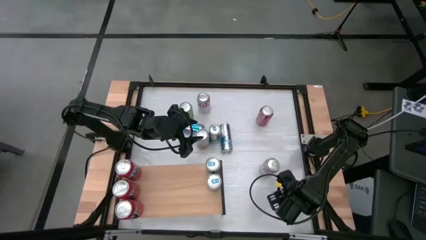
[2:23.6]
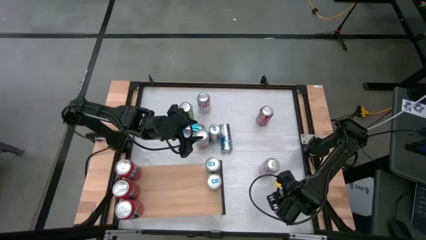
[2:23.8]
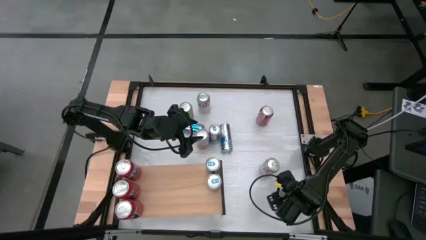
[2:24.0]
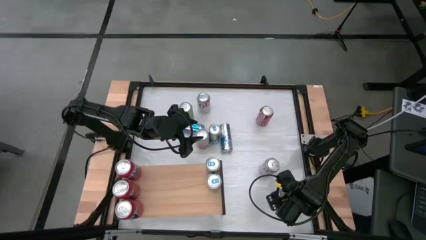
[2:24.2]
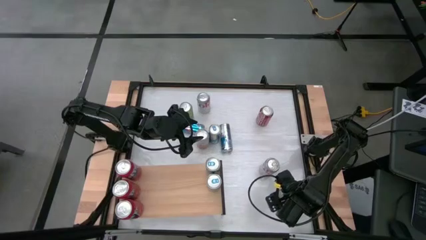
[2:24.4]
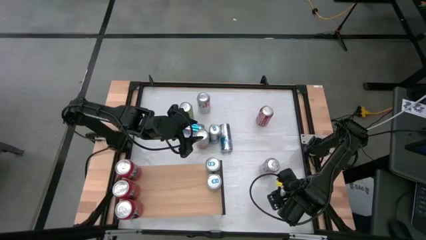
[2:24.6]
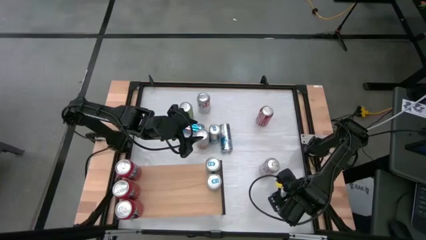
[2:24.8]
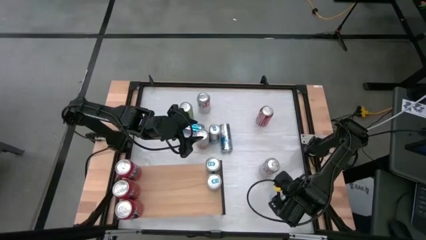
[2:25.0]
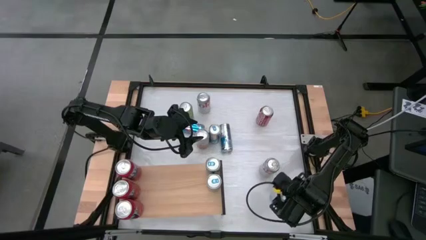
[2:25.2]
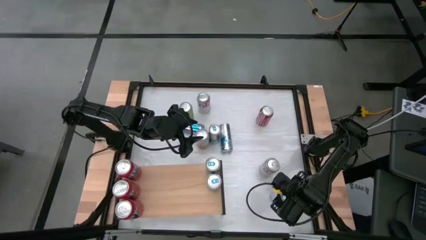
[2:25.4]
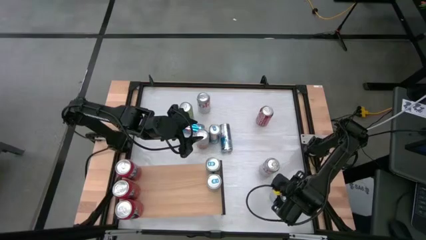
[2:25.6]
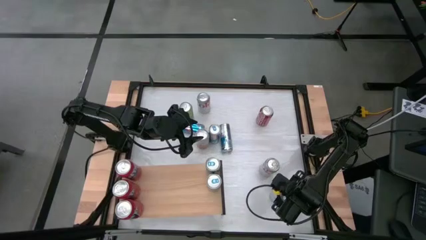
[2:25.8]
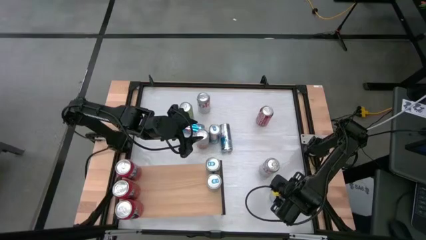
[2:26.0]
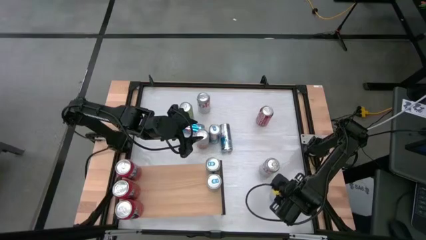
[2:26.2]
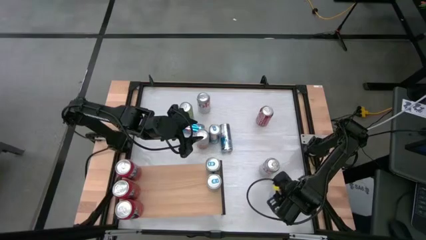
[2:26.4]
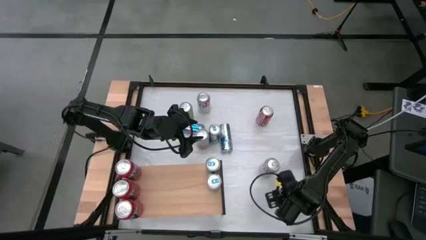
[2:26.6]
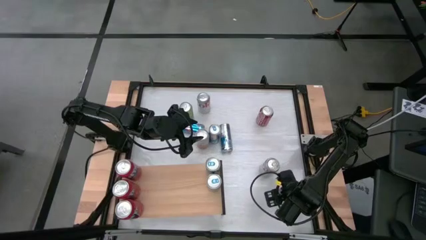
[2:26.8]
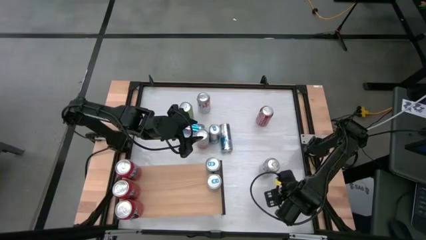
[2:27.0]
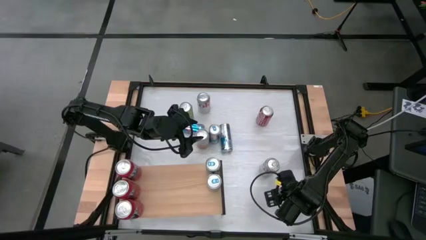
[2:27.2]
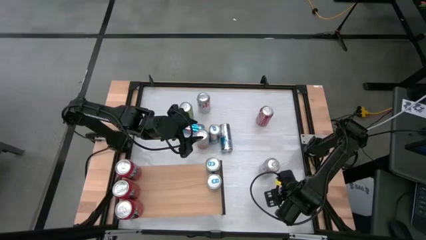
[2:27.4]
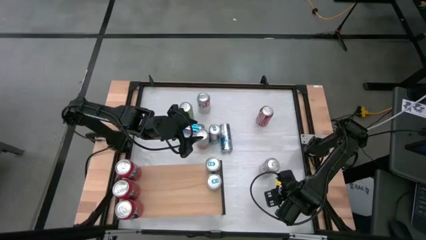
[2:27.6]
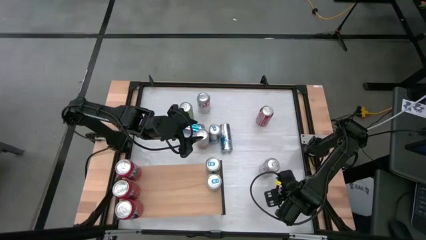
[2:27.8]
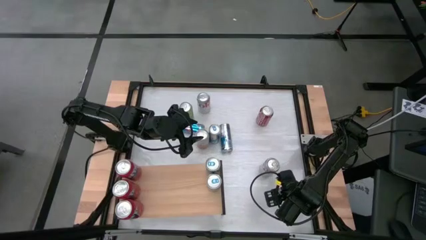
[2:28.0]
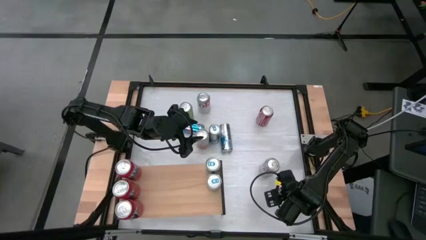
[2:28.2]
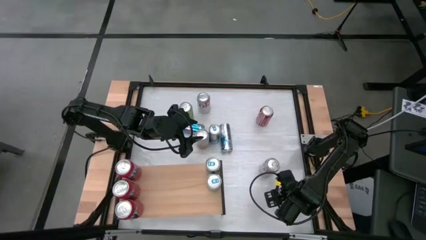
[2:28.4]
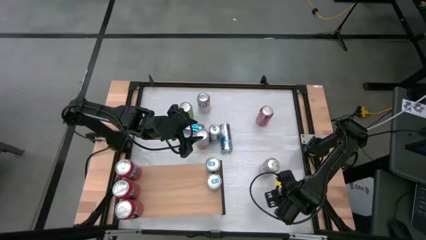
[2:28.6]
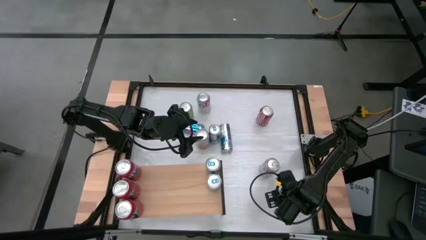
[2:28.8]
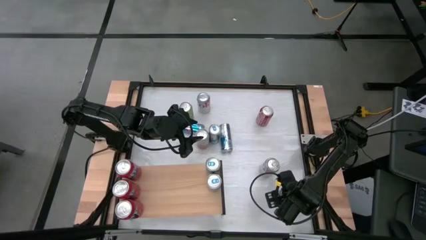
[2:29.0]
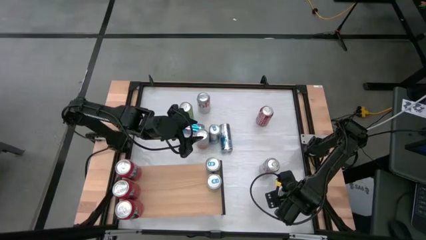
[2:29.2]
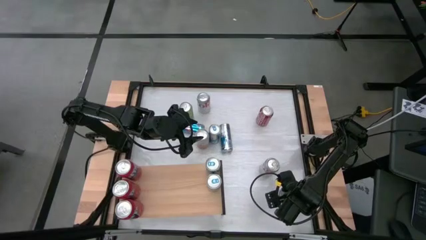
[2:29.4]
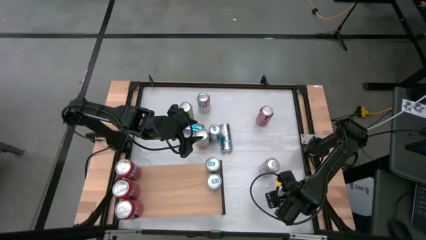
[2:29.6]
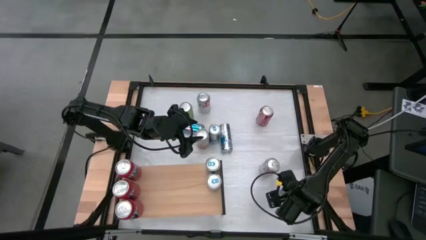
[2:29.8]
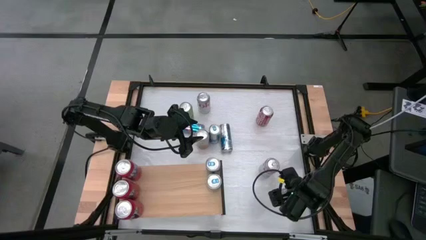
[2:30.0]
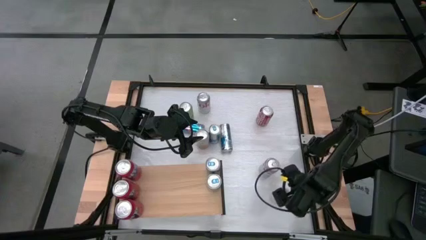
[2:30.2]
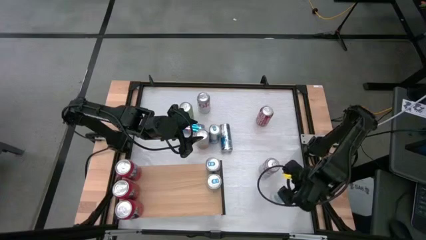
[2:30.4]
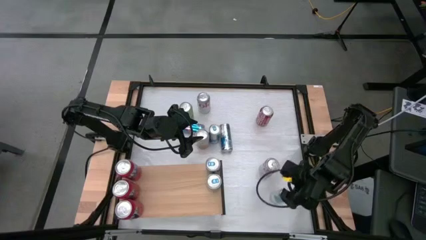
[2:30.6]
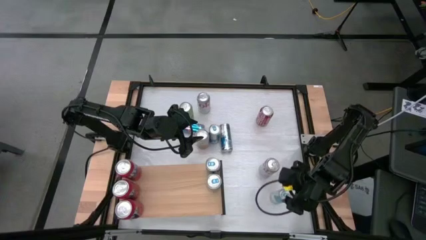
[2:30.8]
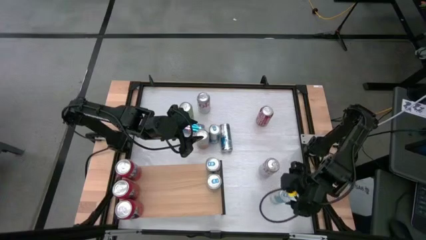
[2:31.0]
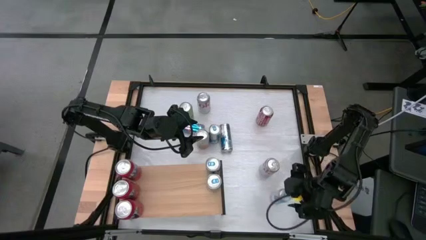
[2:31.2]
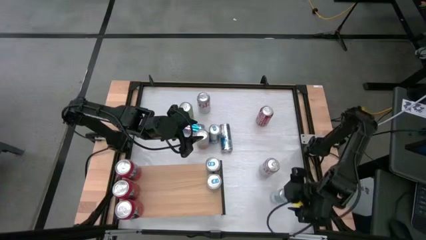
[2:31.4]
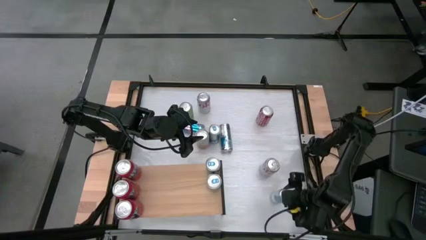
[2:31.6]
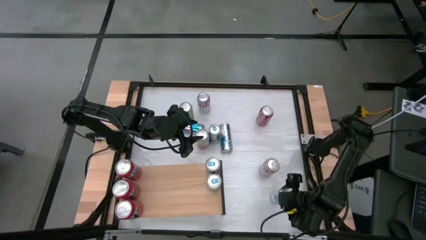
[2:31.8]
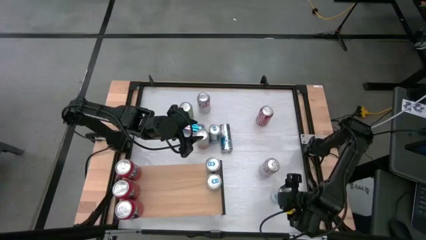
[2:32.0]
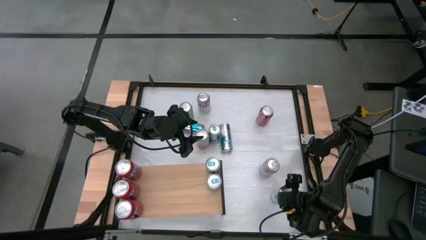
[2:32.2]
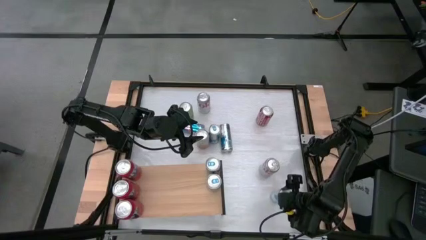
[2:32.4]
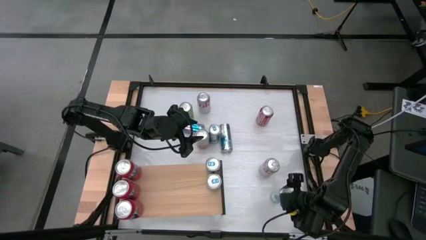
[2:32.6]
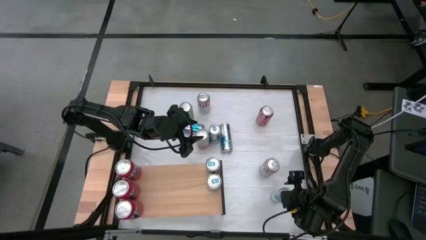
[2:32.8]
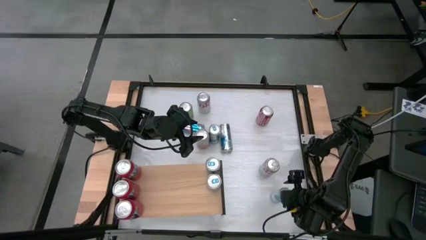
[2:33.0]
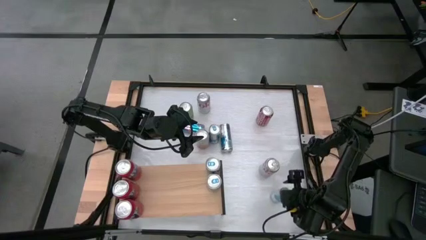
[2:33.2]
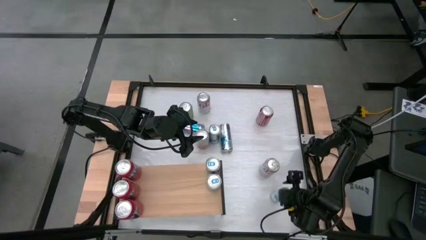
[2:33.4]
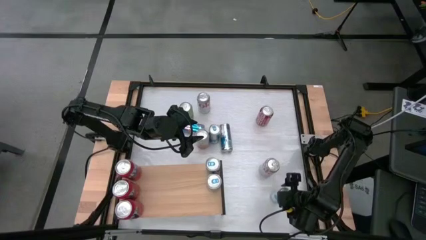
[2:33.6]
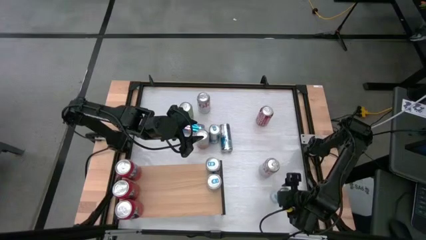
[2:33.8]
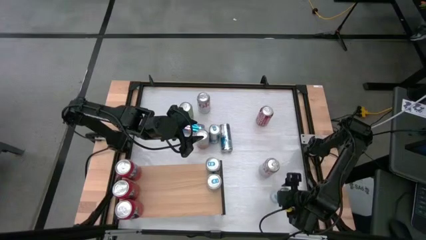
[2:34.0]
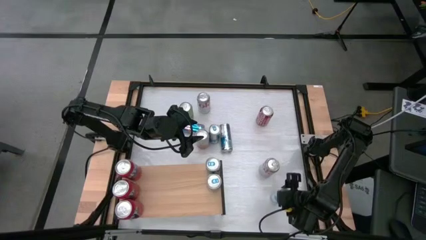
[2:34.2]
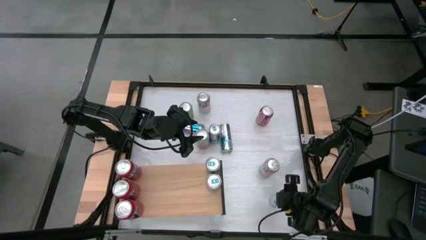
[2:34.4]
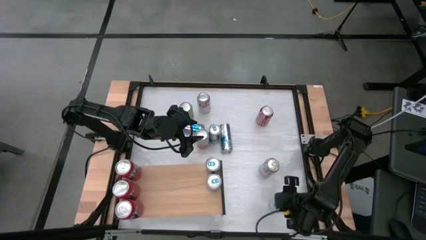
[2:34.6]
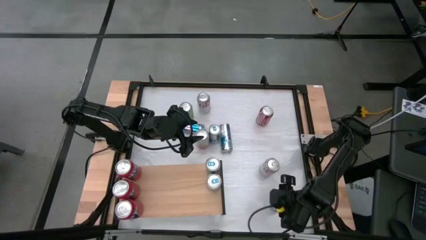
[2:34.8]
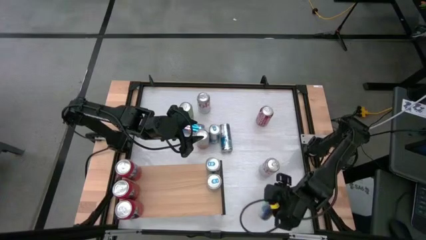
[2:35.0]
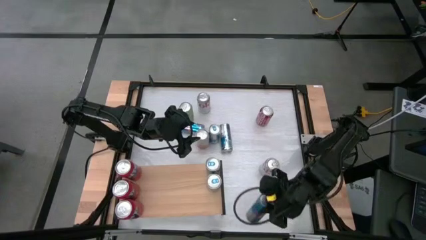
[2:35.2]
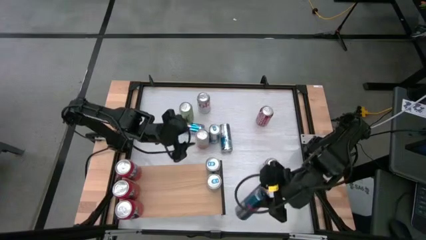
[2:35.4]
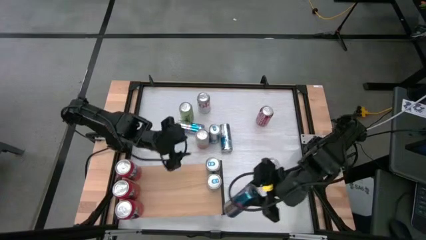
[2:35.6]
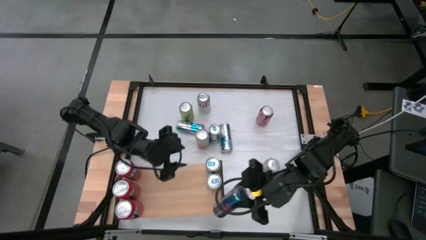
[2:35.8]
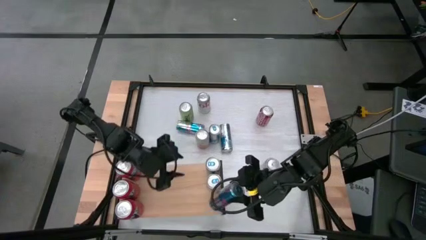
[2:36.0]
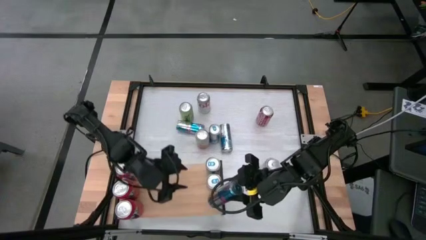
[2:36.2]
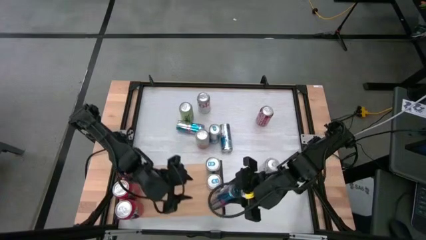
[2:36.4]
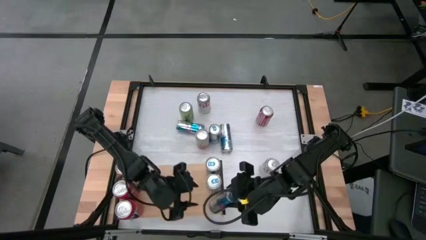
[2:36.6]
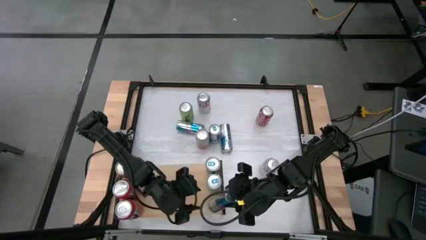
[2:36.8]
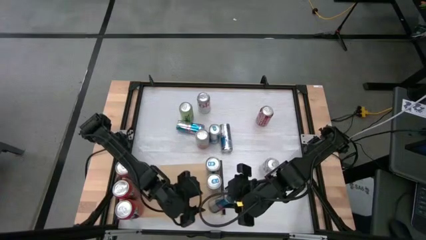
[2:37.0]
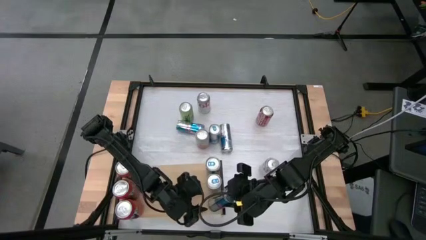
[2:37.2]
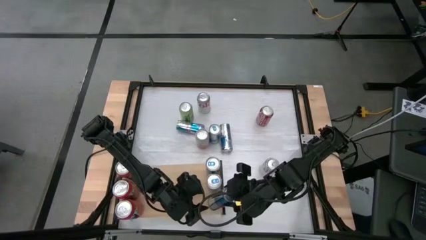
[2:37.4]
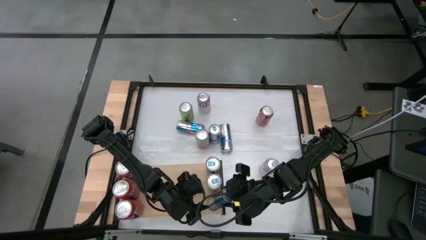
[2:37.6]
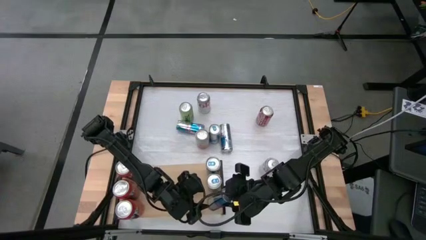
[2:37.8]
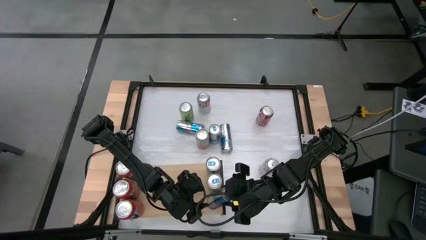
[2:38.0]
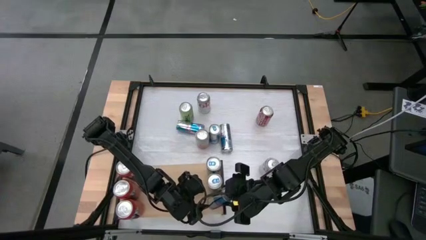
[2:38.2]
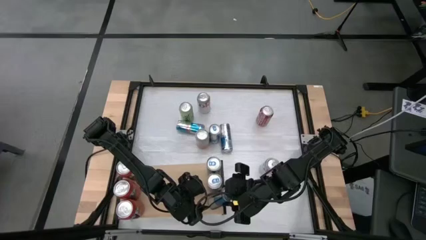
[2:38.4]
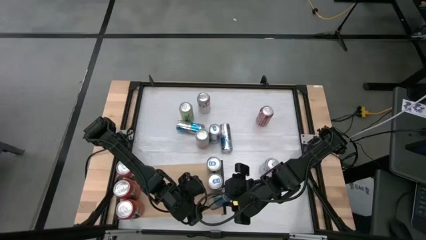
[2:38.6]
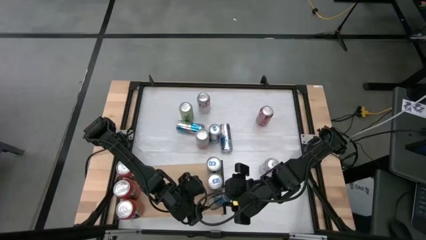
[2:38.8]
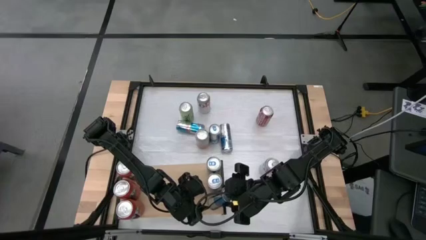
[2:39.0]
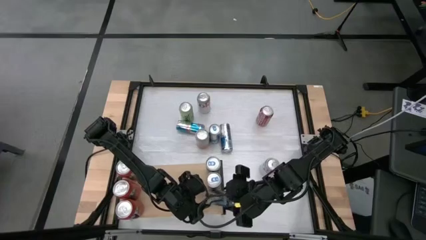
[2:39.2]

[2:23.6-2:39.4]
Task: Place canned beverage on shelf
Put the blue soda can on the shelf aligned with the blue soda cans
